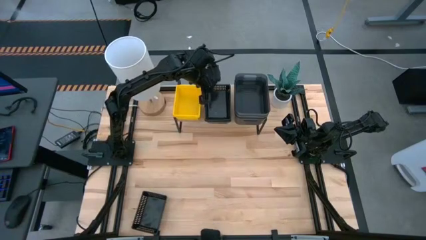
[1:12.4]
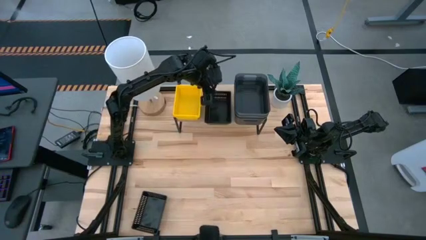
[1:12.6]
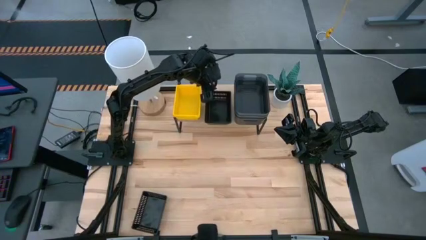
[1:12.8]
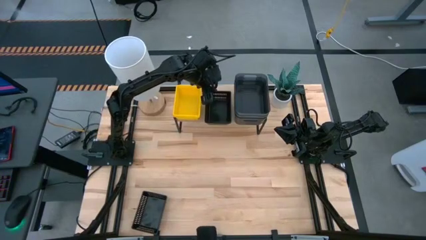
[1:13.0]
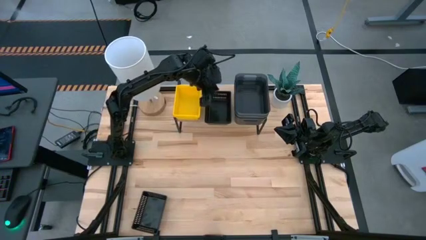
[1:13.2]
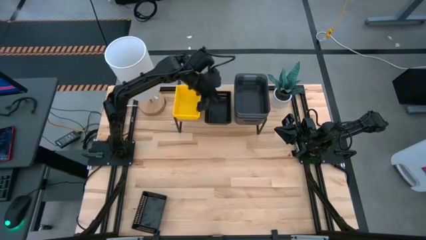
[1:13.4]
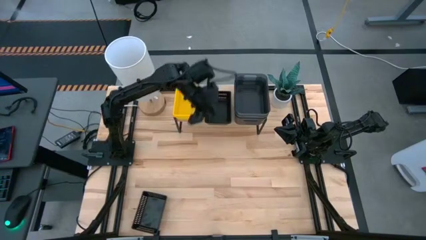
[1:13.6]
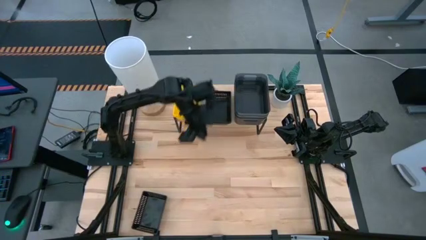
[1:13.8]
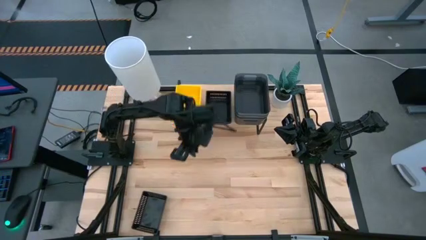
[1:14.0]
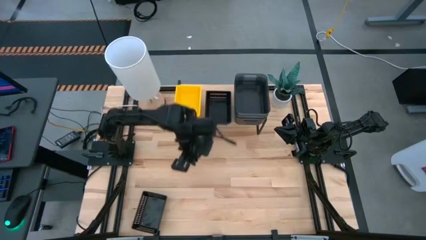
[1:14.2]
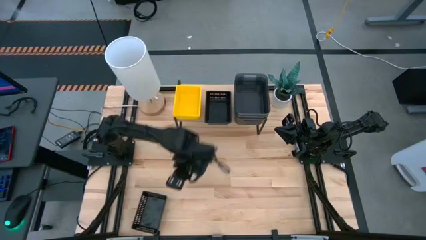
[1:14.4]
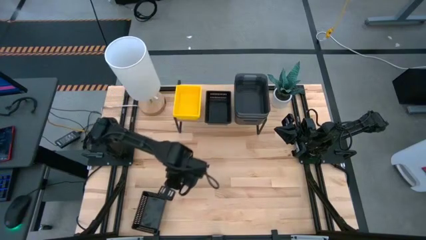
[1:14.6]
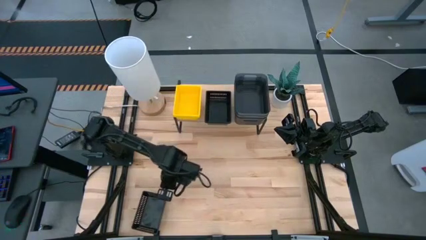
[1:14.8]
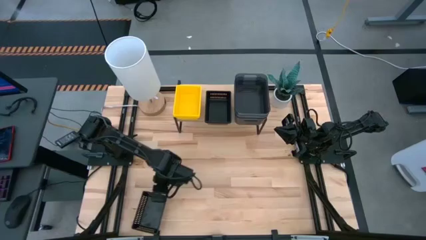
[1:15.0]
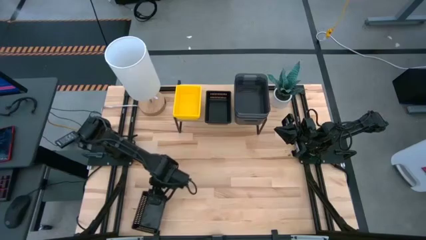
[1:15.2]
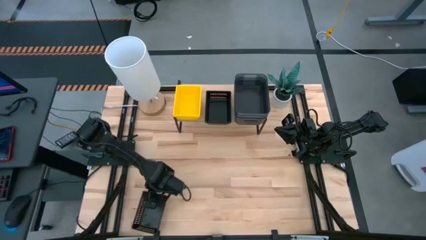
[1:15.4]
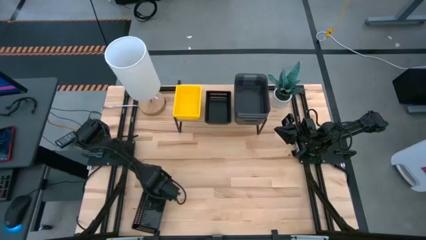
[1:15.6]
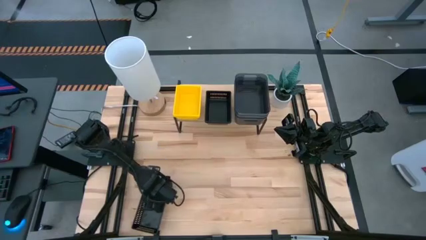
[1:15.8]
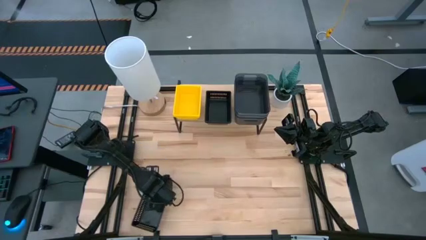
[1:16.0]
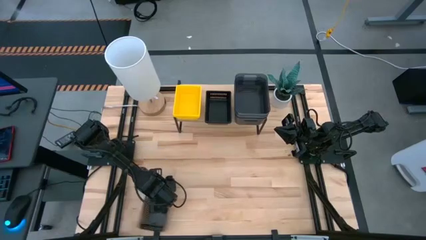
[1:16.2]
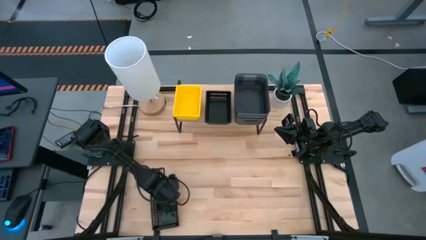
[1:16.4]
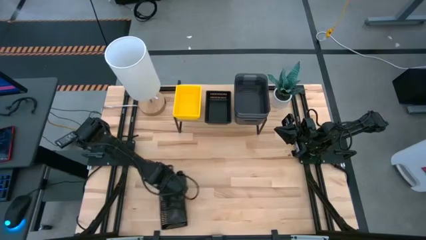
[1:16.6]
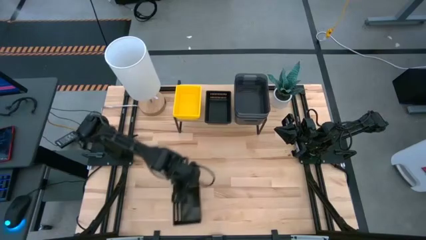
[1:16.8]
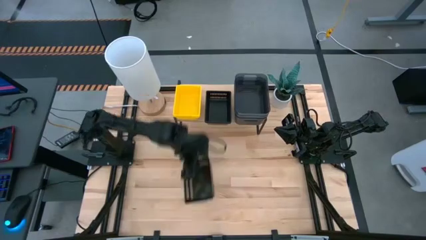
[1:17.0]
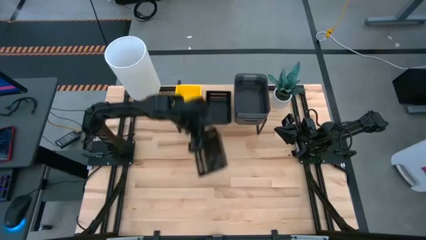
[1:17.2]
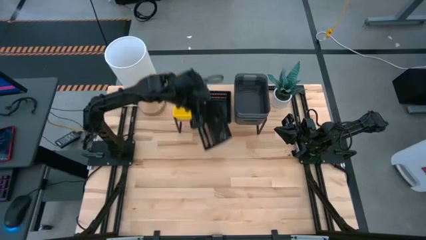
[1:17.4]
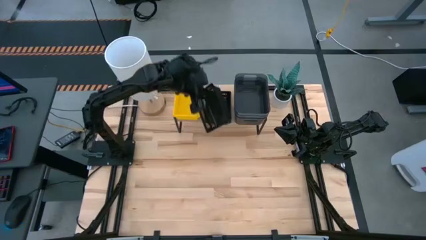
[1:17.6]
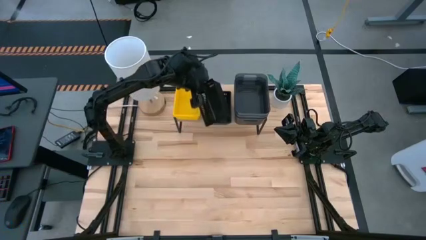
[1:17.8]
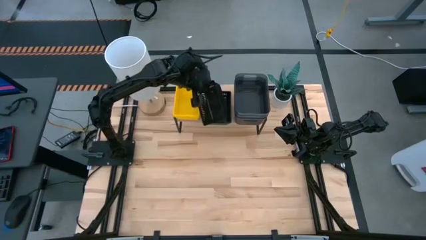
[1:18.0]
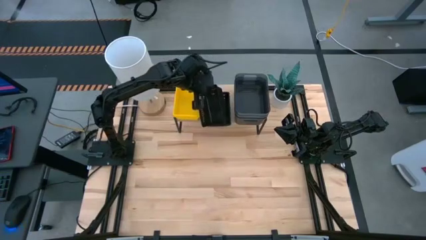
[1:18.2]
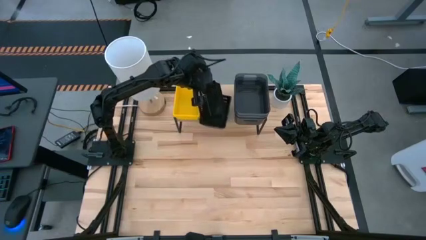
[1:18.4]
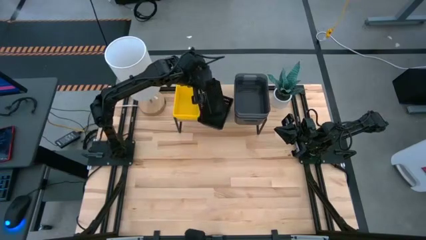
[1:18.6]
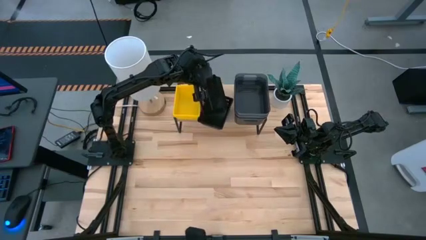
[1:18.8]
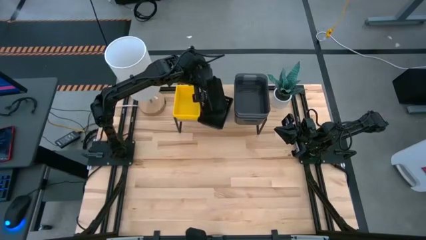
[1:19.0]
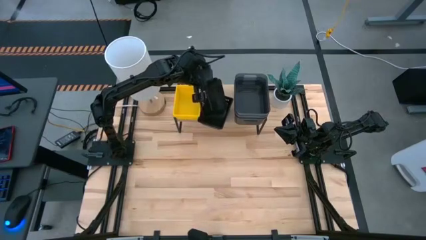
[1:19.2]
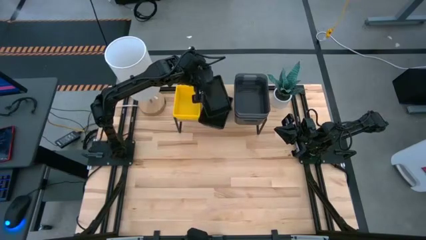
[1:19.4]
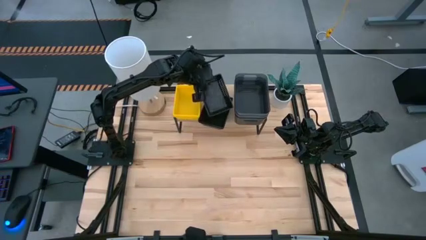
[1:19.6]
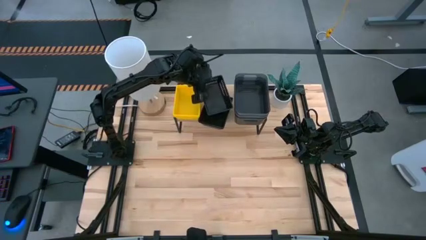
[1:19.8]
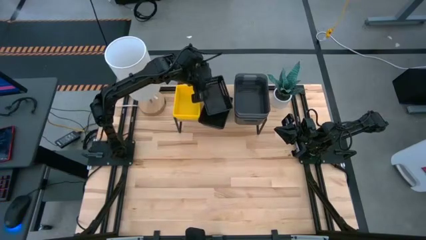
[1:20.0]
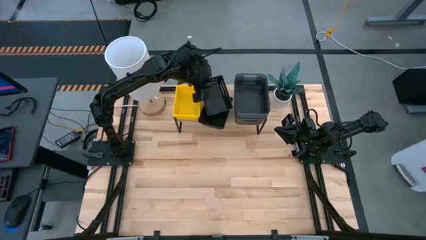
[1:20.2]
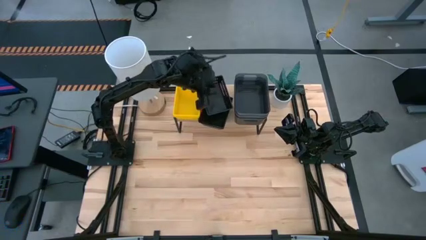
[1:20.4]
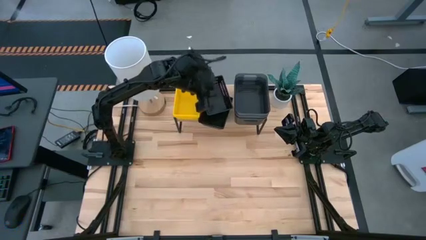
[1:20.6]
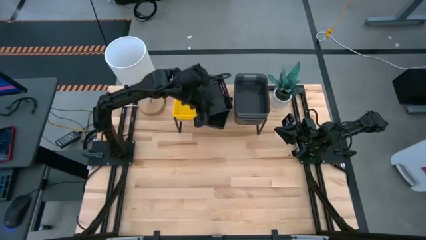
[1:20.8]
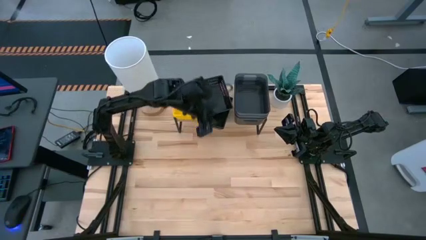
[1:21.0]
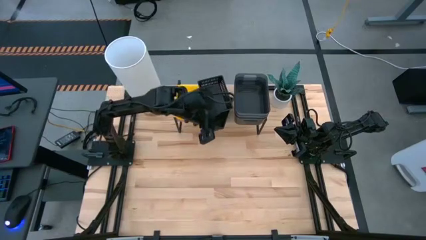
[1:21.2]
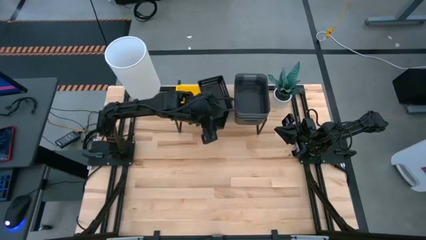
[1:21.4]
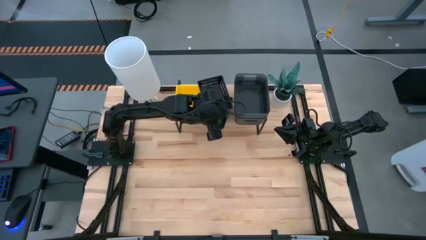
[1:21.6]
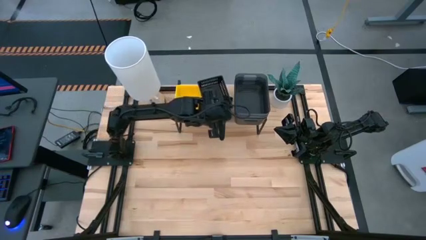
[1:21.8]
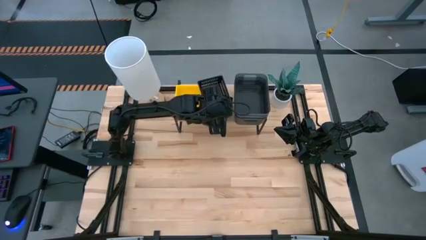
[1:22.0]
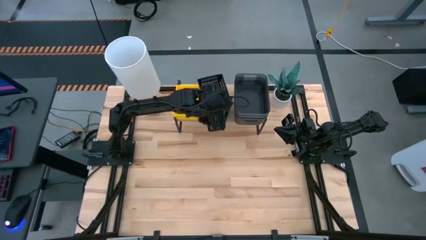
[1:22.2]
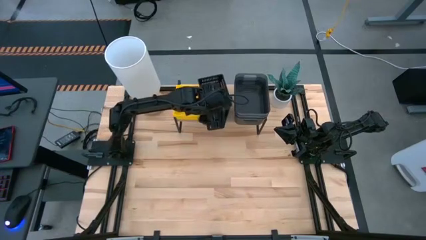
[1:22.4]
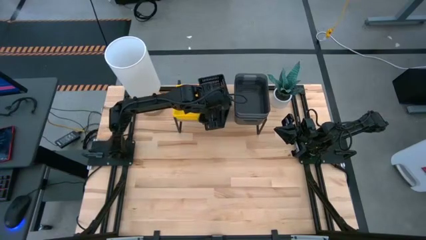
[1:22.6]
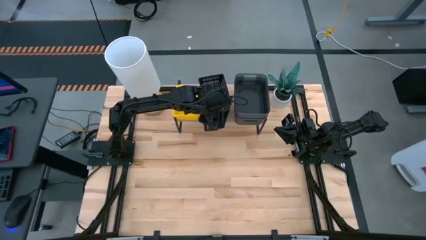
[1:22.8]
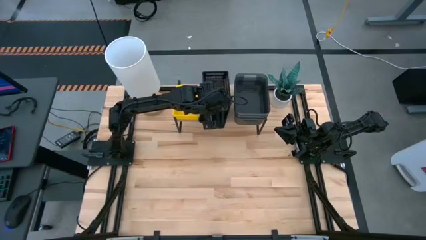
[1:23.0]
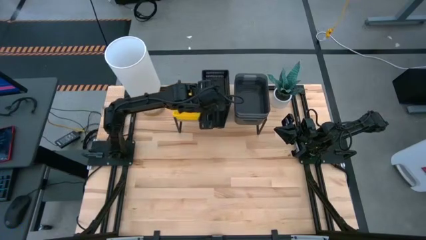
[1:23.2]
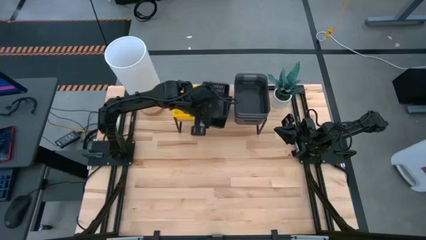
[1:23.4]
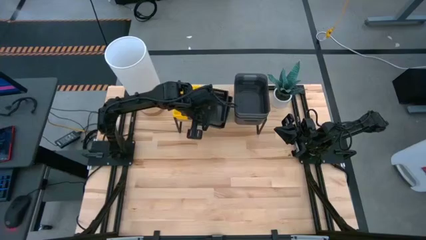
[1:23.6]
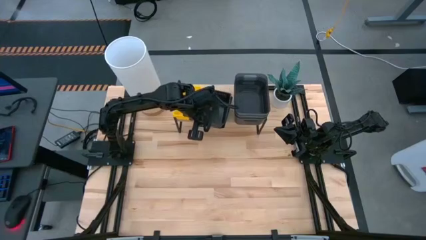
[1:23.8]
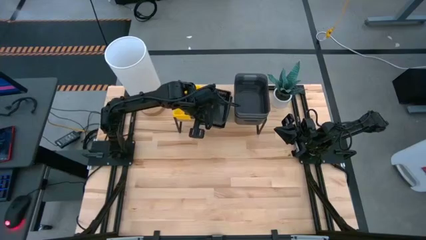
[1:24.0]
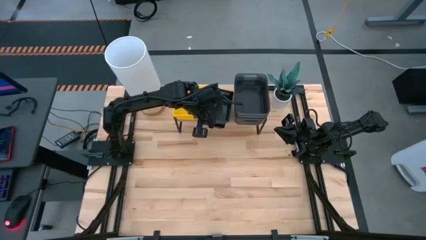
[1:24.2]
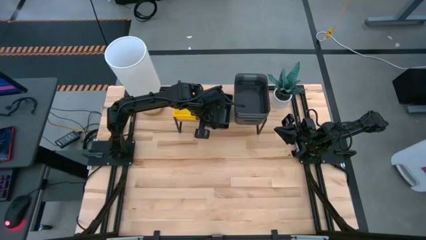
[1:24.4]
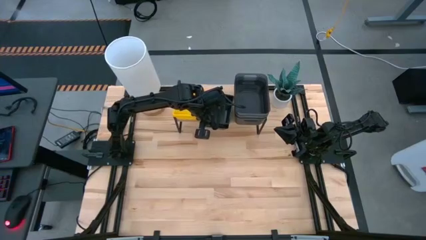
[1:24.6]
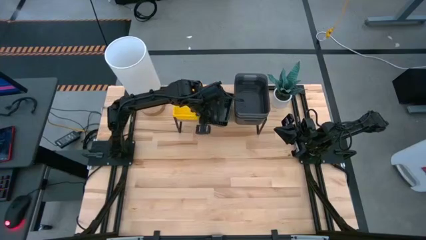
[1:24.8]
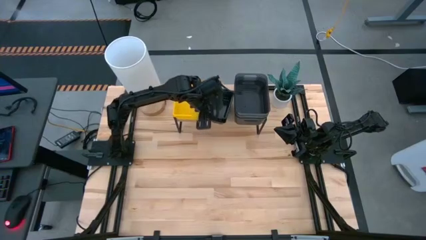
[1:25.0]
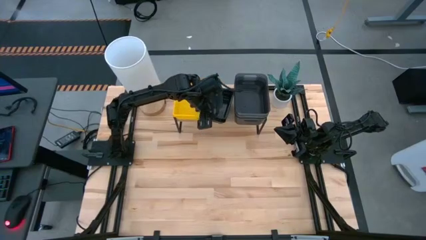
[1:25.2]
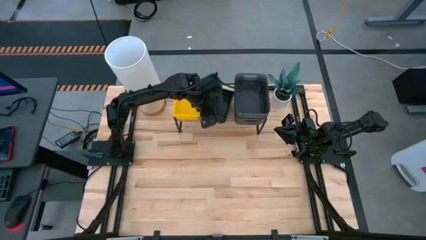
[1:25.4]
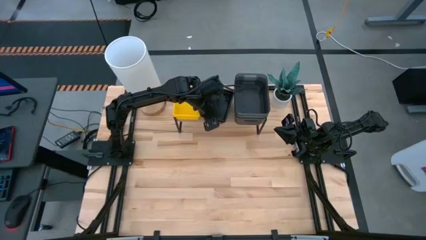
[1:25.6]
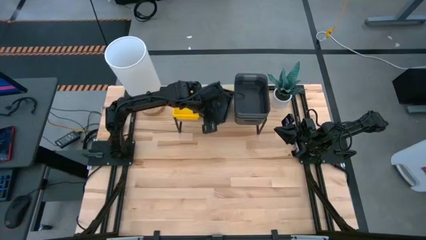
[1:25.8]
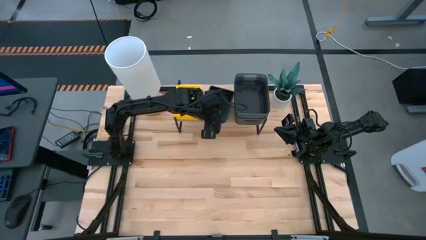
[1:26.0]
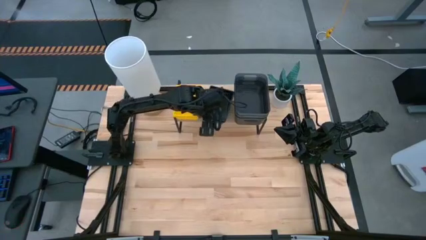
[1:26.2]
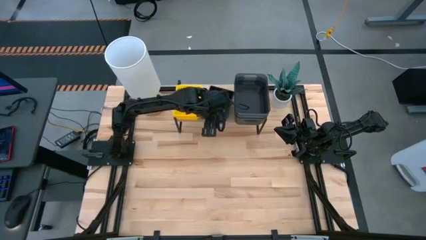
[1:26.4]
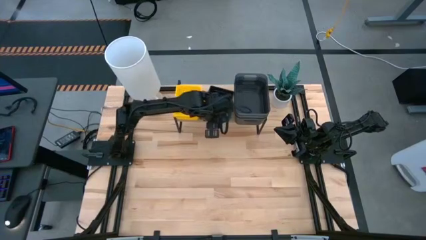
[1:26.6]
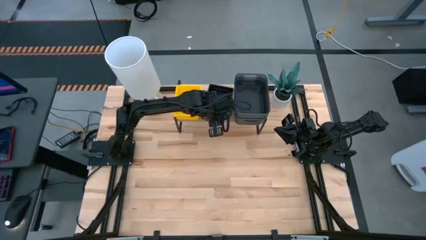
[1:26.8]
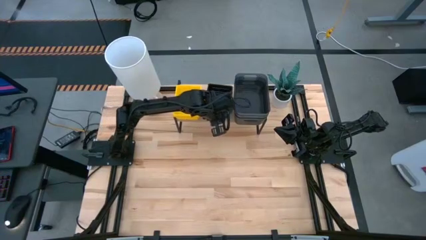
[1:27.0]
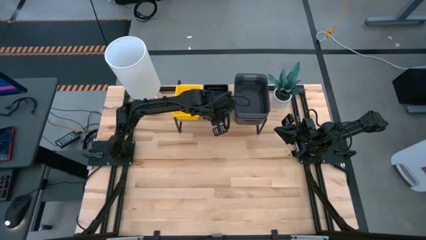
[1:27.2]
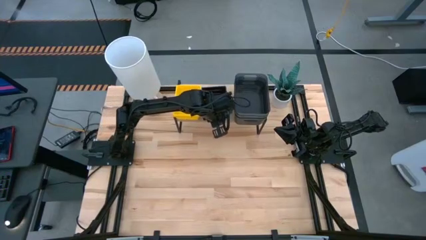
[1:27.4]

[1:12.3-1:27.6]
Task: Stack baskets on shelf by color
Stack the black bin on top of the black bin on the shelf
